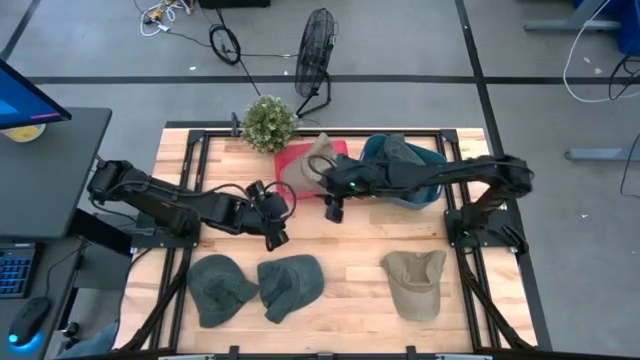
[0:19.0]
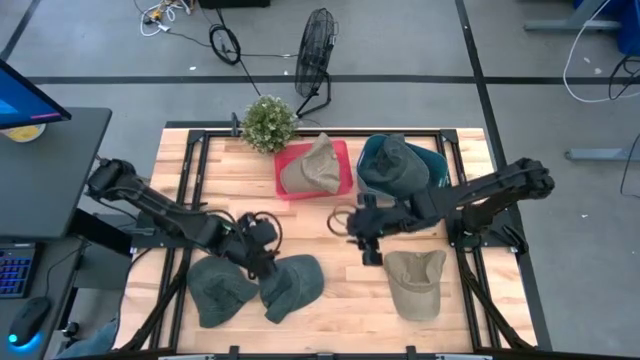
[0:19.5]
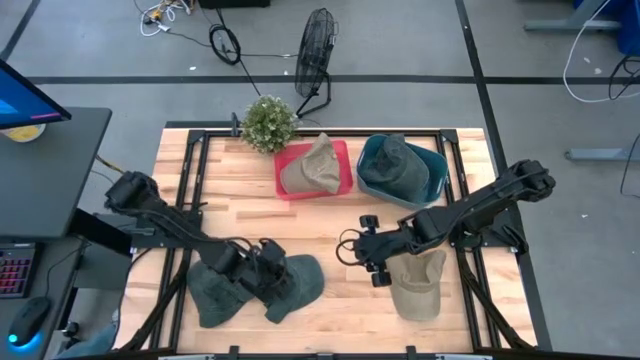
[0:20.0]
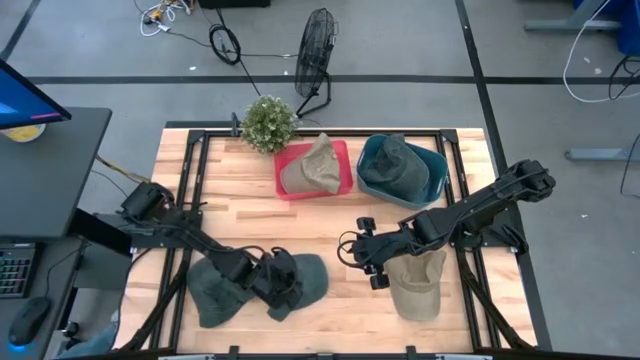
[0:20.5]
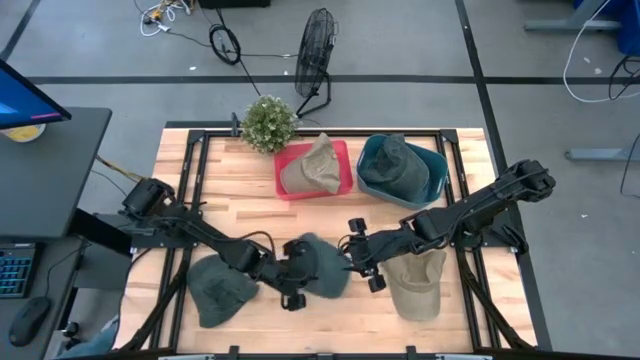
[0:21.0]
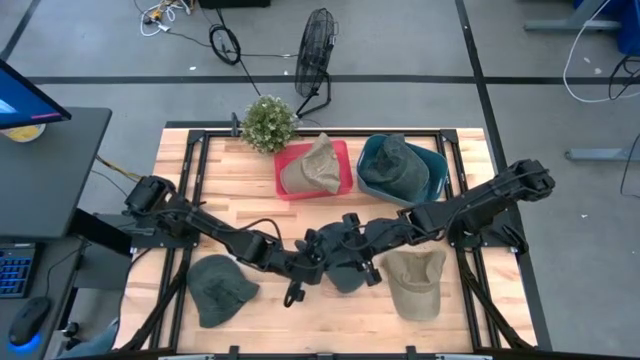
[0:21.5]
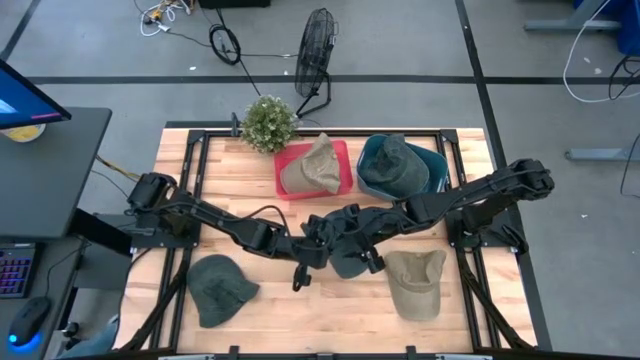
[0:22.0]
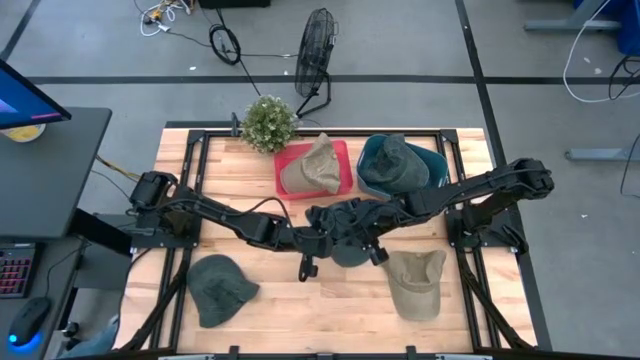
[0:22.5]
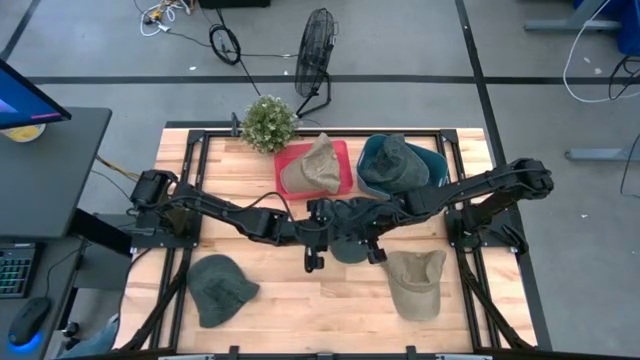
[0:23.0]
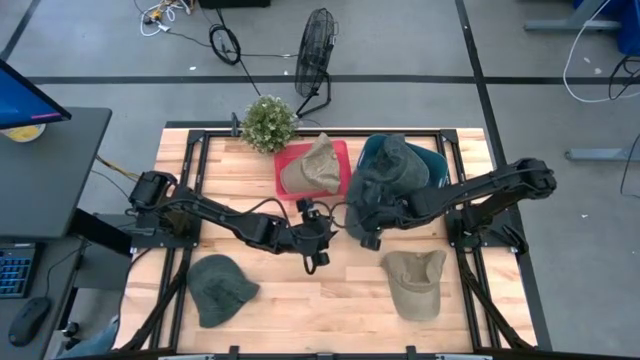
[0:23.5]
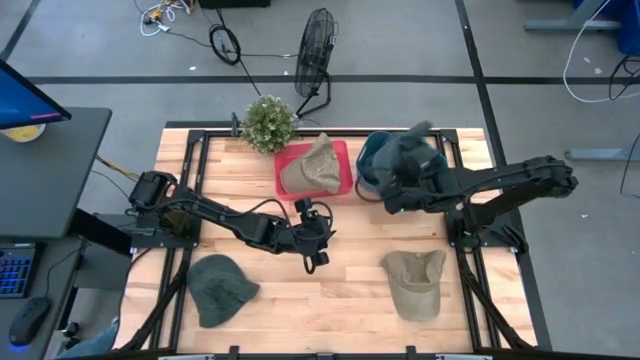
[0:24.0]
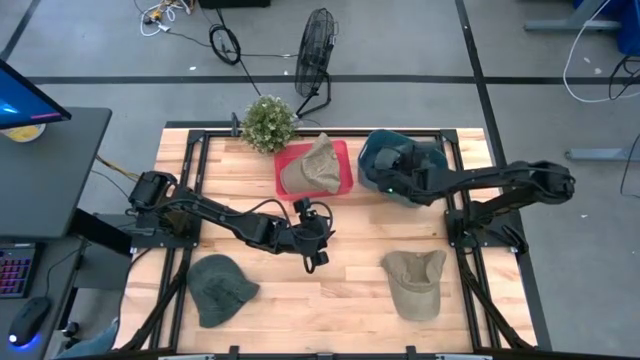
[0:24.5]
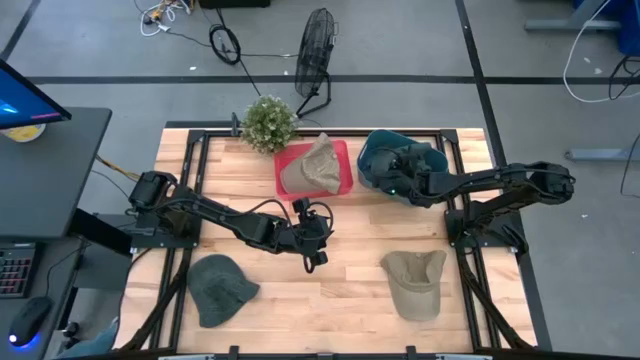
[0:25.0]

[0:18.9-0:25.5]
Task: Pick & Place hat
Put the left black cap into the blue bin

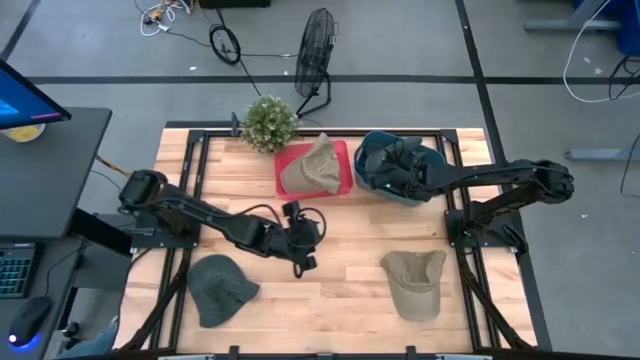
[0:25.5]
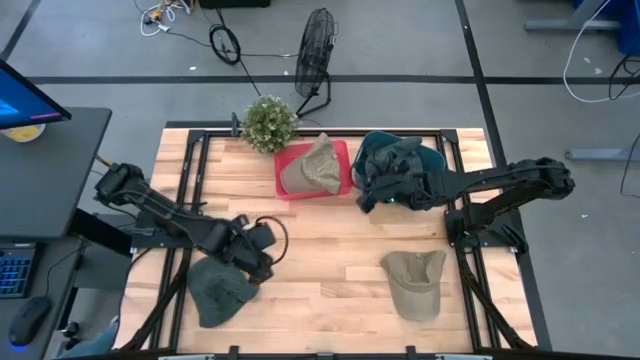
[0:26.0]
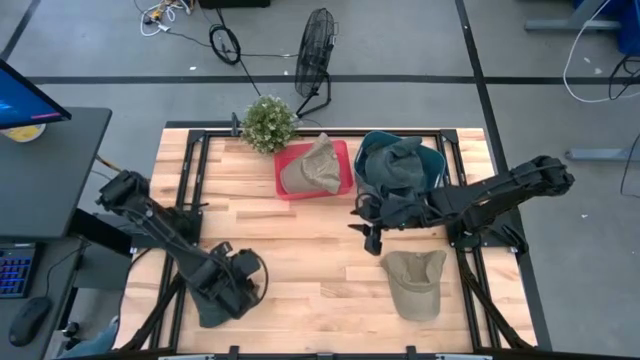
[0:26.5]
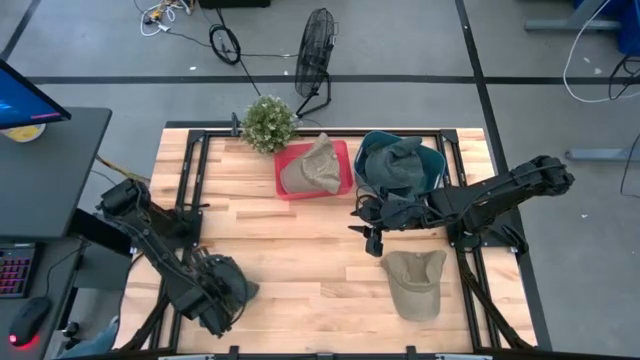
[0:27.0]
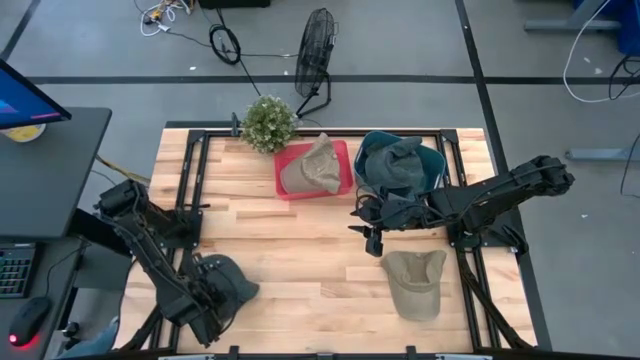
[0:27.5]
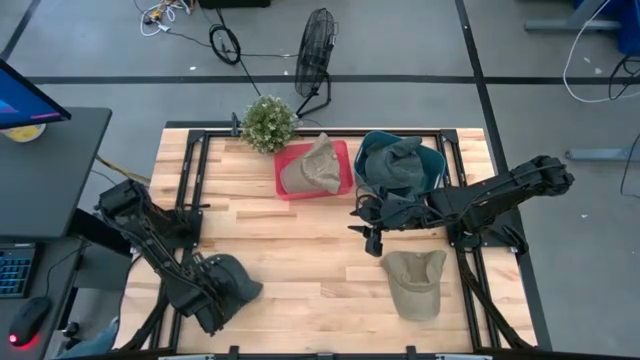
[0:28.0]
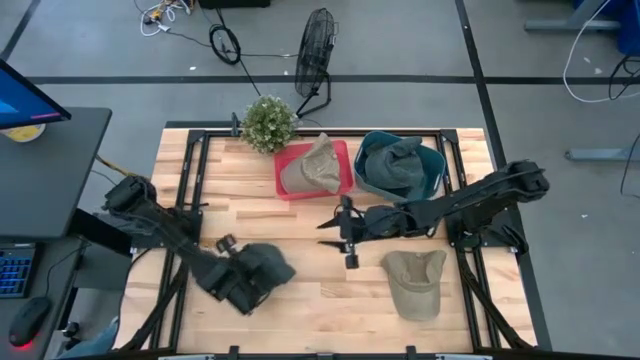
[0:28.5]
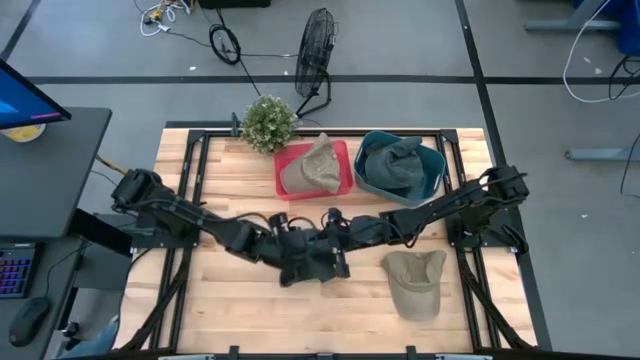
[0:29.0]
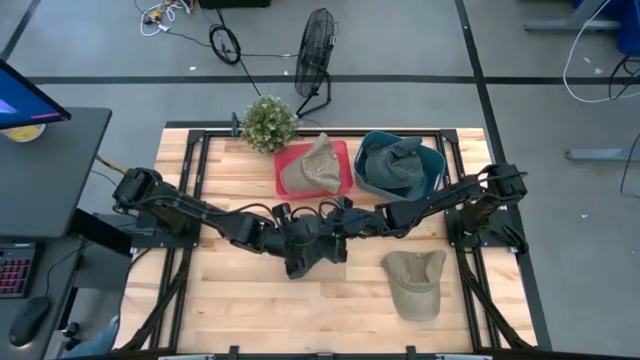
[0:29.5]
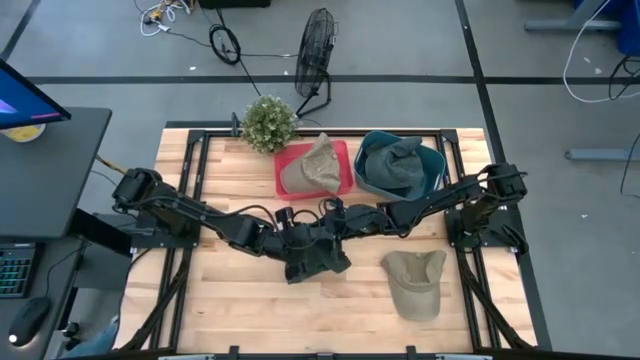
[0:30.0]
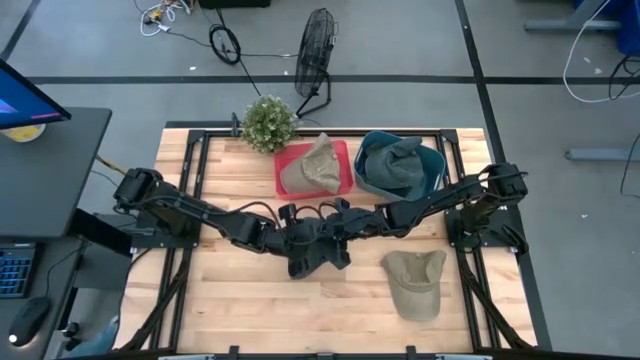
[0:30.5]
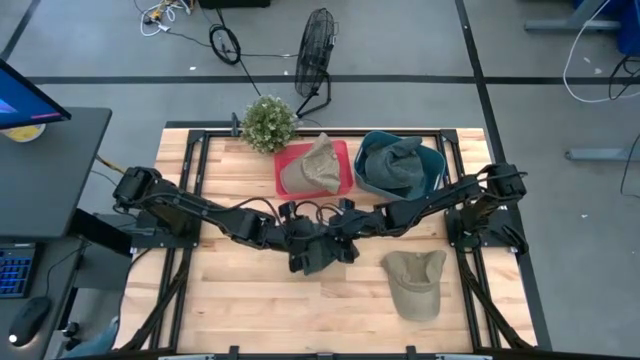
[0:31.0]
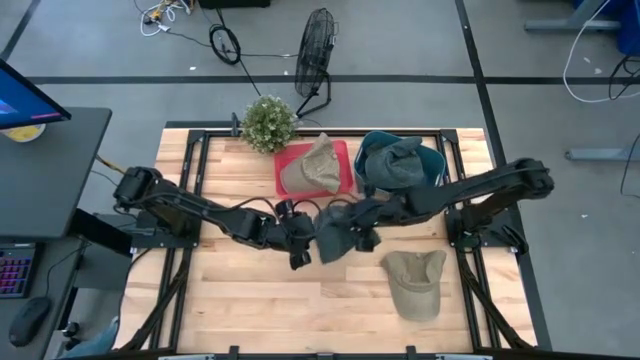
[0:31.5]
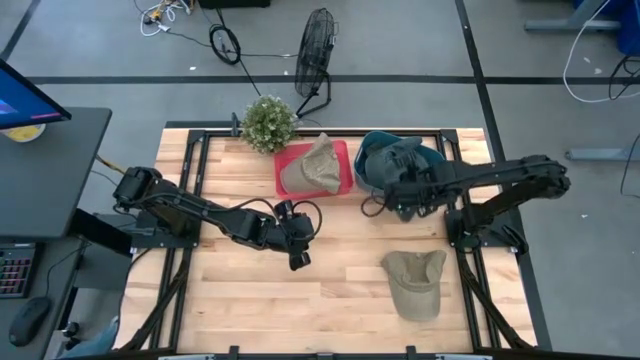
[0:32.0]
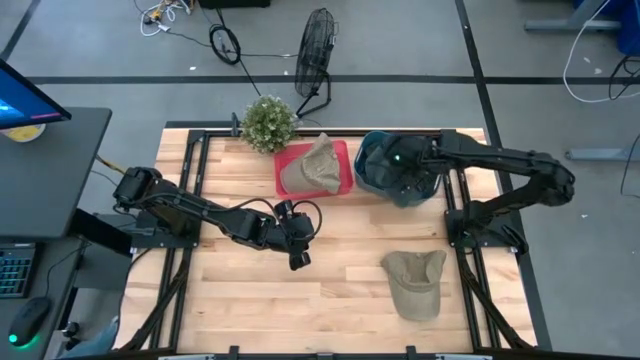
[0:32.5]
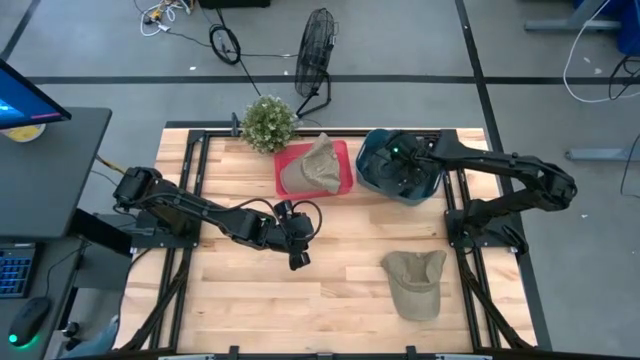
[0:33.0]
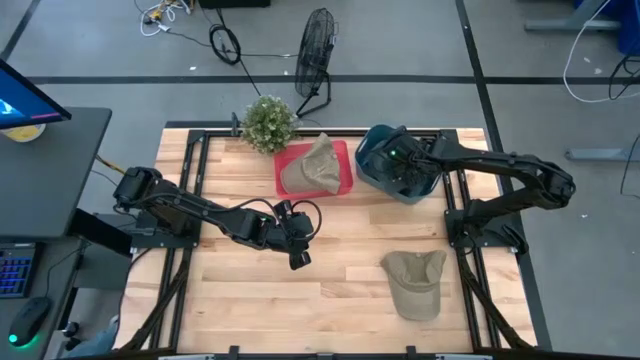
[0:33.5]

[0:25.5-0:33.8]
Put the black cap into the blue bin

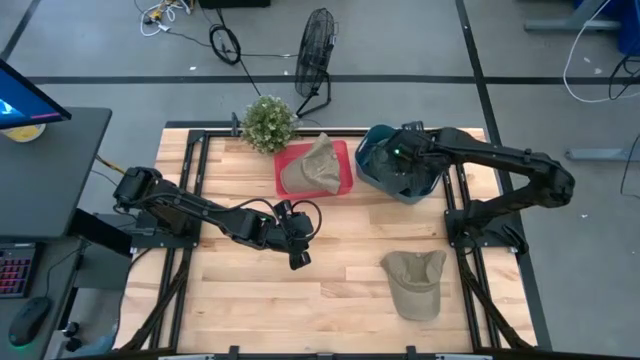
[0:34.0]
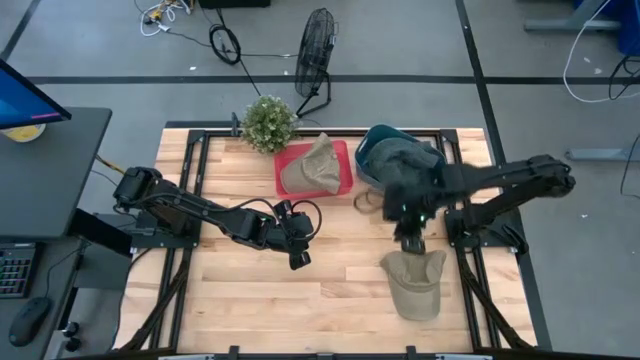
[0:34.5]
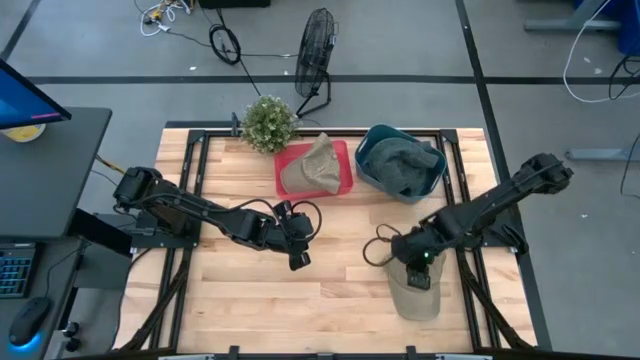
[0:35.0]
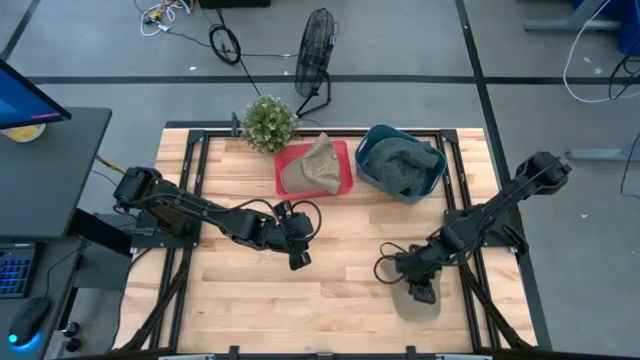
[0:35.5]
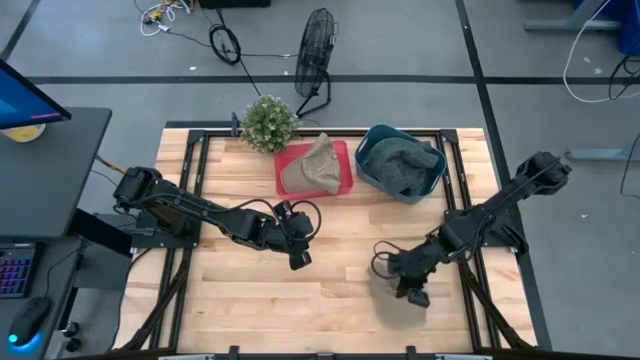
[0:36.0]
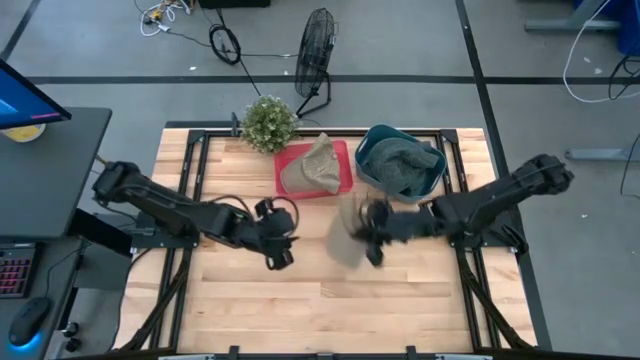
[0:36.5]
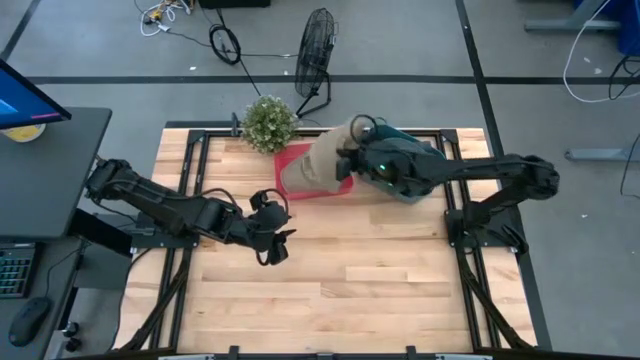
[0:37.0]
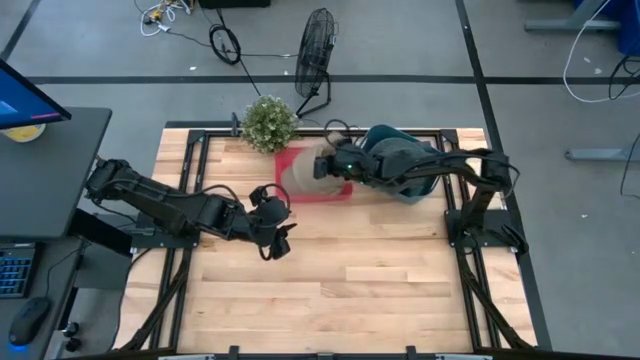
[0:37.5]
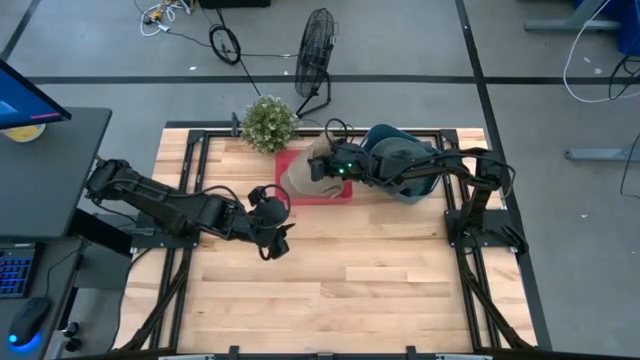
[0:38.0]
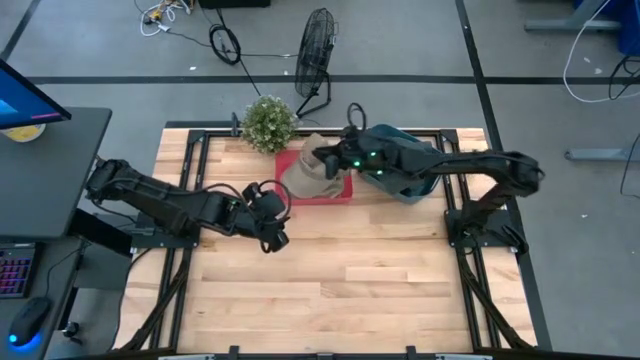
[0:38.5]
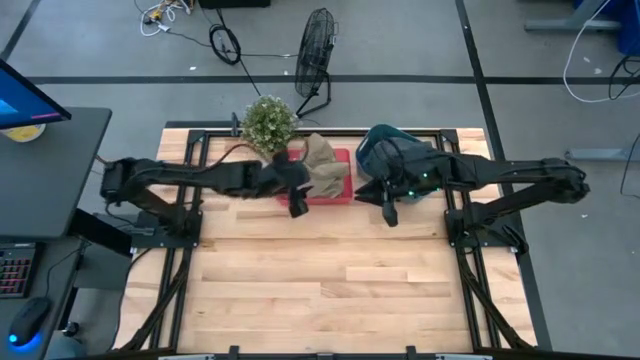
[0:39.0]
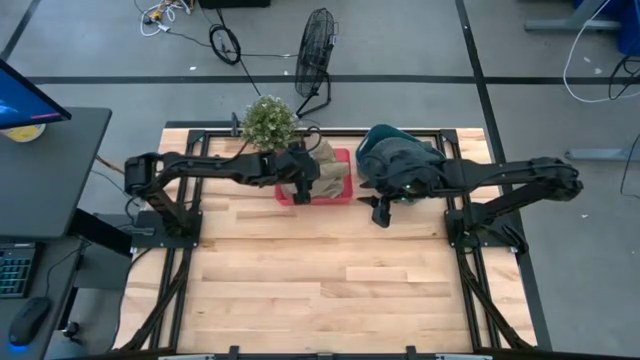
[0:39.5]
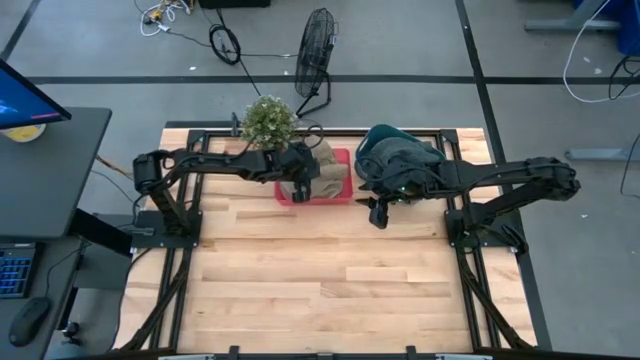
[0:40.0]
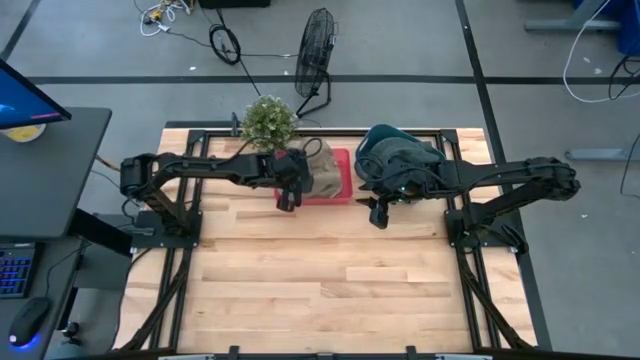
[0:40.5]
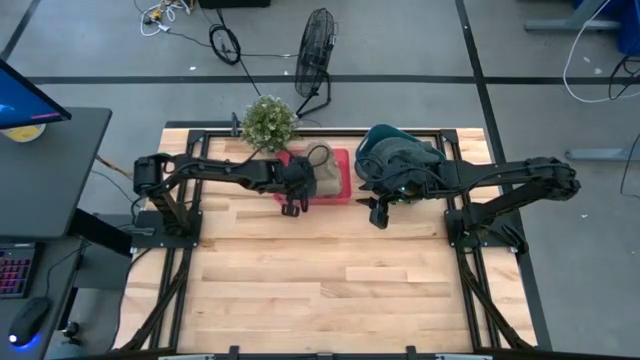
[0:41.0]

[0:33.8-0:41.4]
Put the brown cap into the red bin
